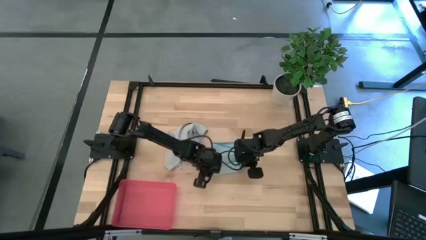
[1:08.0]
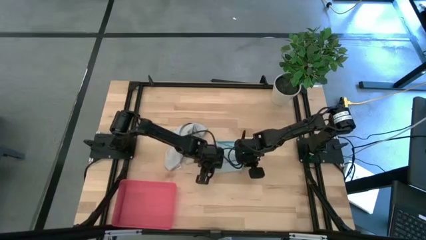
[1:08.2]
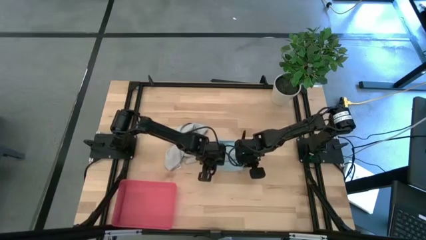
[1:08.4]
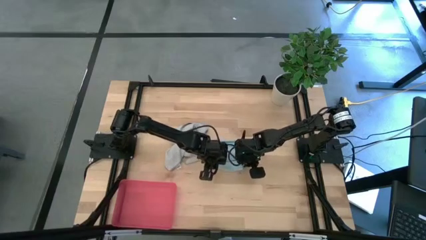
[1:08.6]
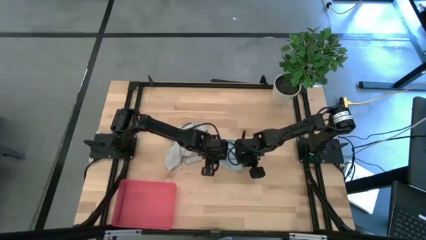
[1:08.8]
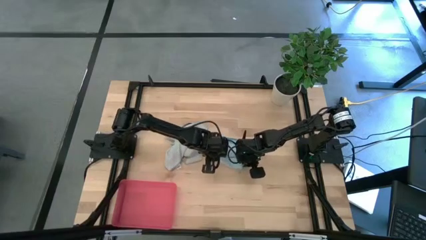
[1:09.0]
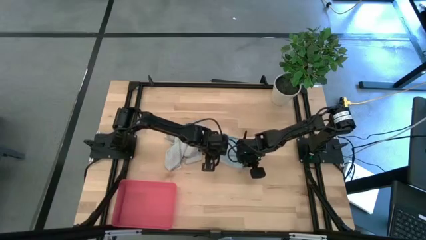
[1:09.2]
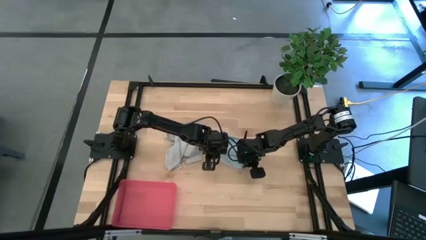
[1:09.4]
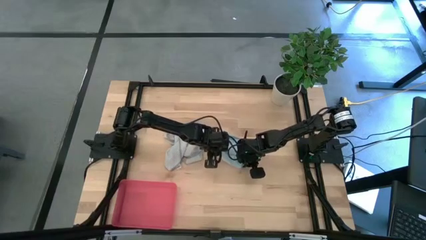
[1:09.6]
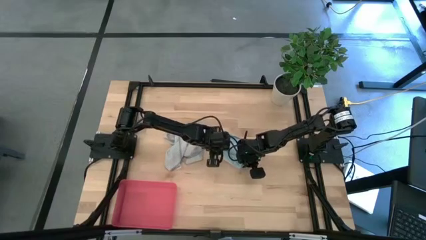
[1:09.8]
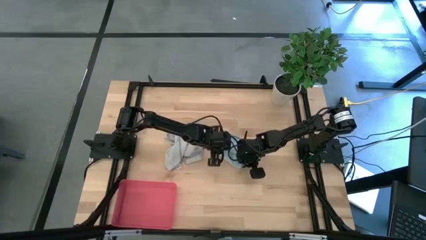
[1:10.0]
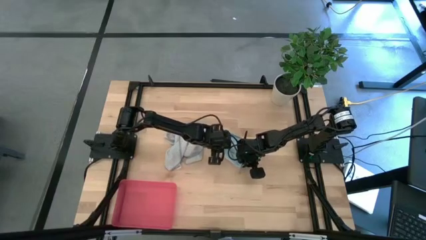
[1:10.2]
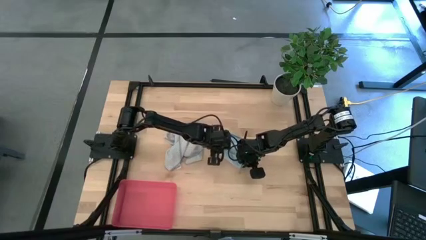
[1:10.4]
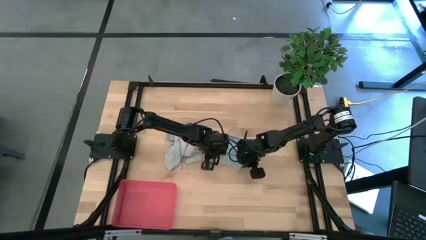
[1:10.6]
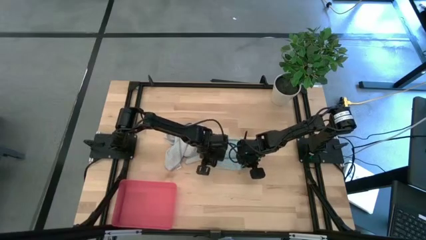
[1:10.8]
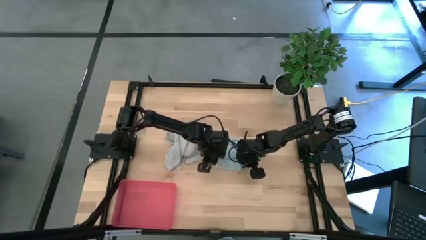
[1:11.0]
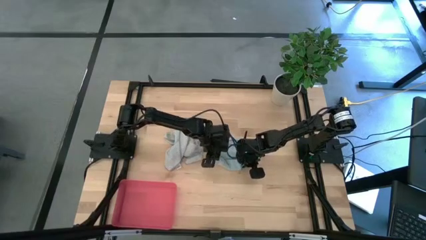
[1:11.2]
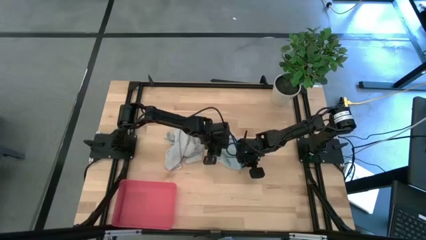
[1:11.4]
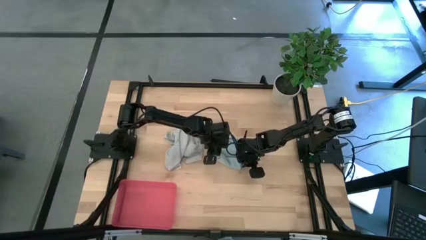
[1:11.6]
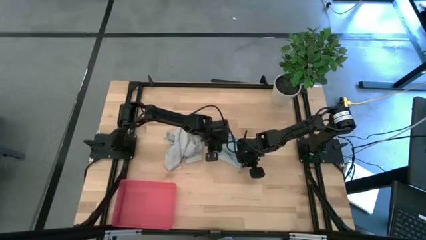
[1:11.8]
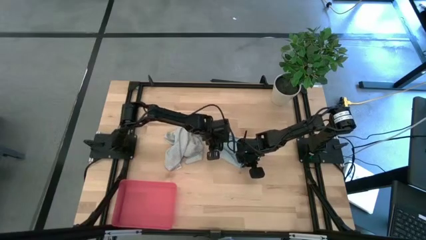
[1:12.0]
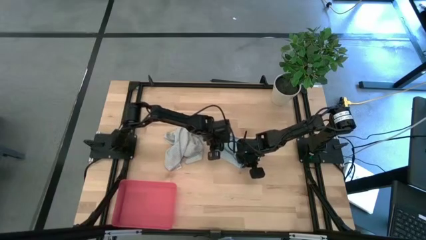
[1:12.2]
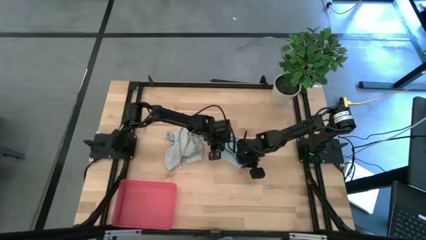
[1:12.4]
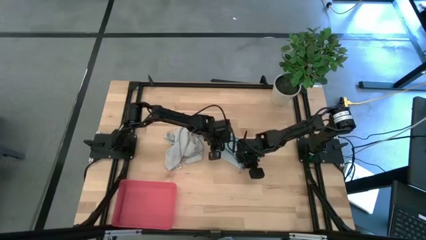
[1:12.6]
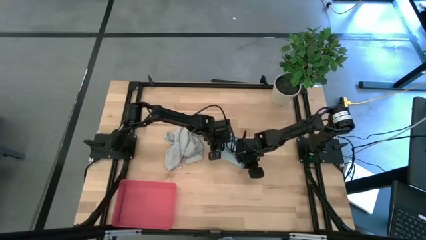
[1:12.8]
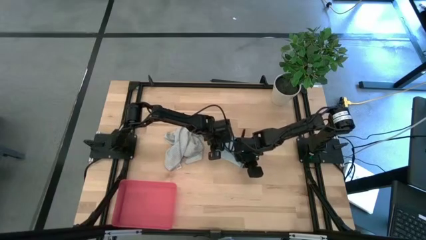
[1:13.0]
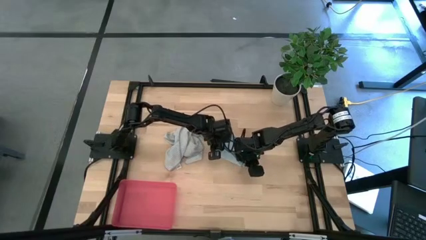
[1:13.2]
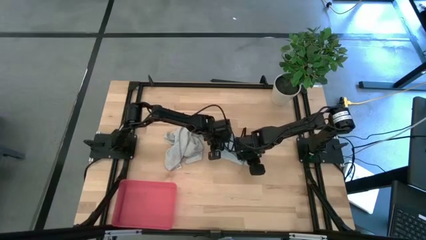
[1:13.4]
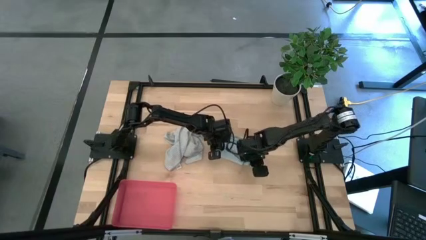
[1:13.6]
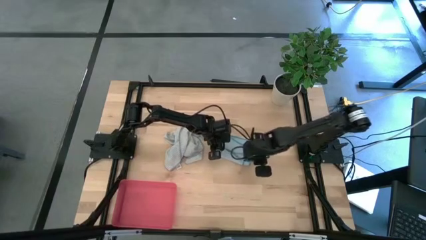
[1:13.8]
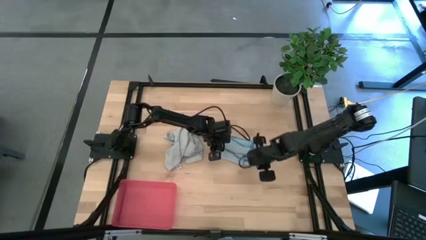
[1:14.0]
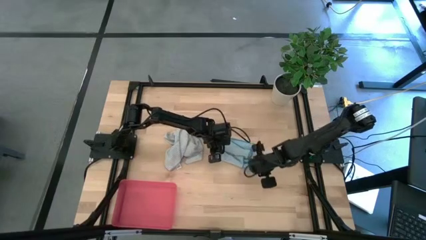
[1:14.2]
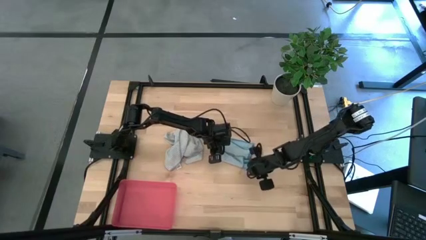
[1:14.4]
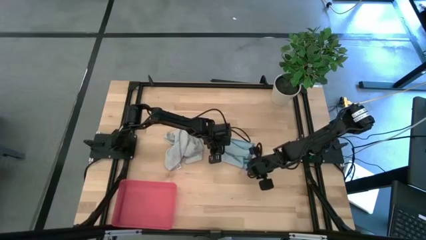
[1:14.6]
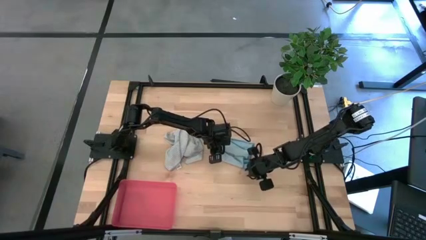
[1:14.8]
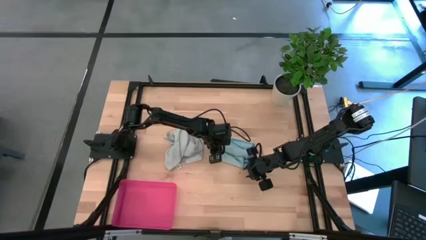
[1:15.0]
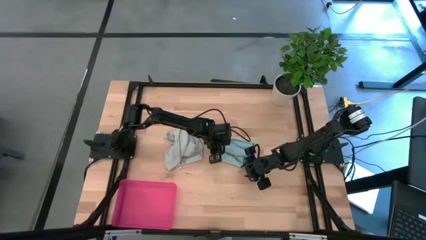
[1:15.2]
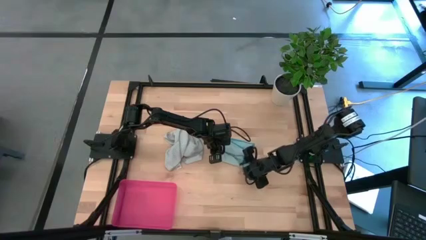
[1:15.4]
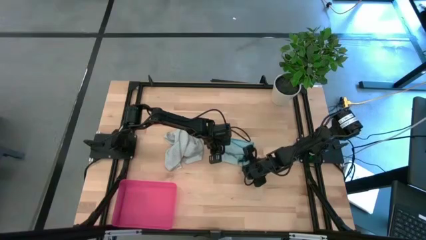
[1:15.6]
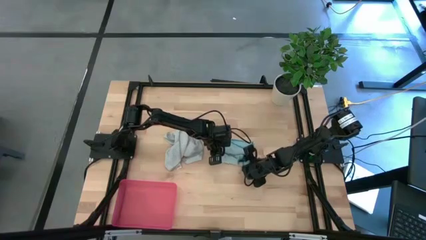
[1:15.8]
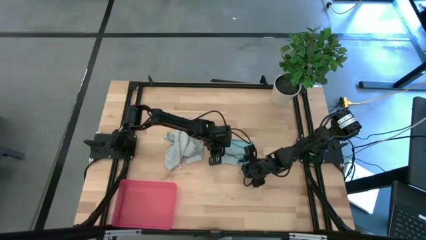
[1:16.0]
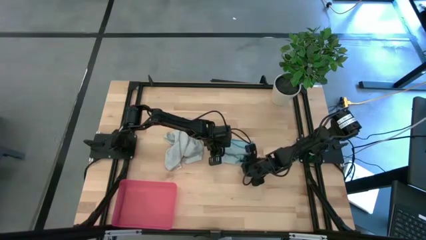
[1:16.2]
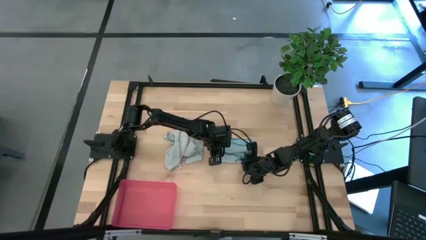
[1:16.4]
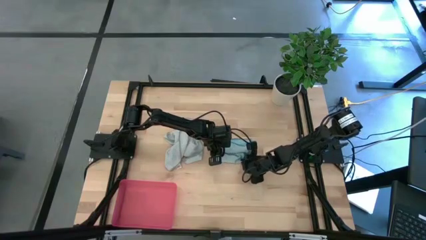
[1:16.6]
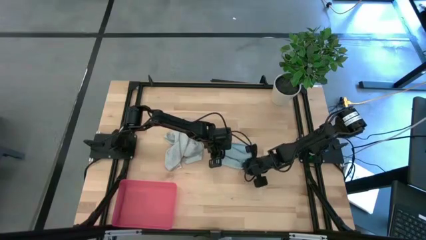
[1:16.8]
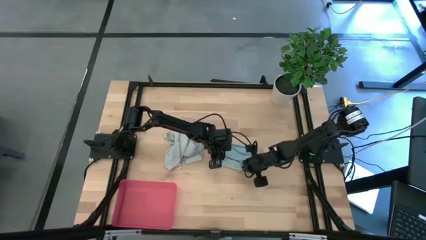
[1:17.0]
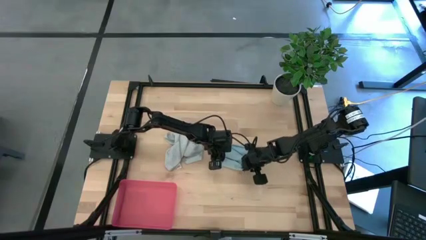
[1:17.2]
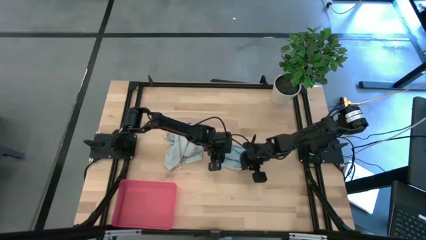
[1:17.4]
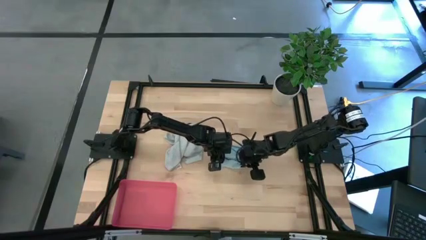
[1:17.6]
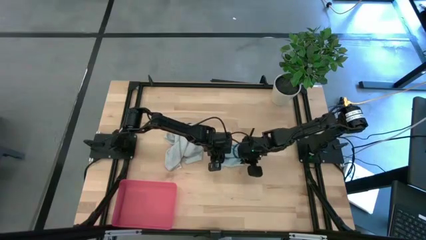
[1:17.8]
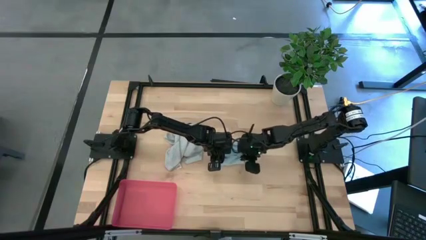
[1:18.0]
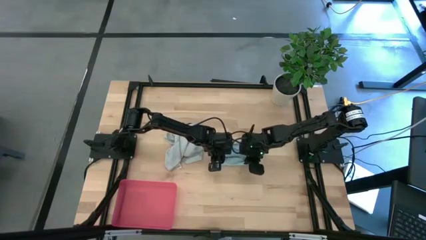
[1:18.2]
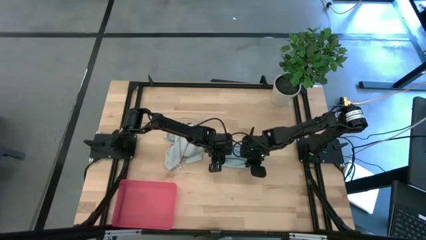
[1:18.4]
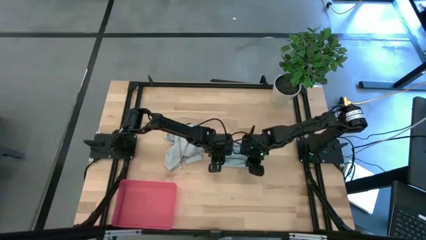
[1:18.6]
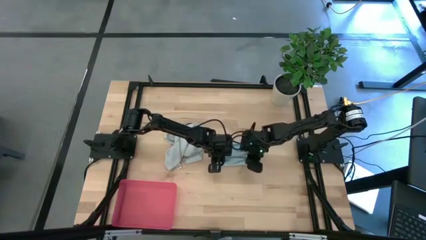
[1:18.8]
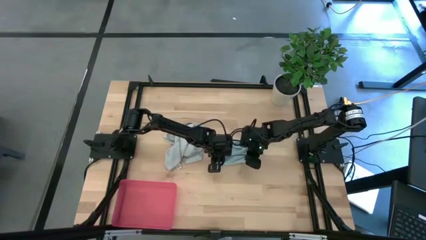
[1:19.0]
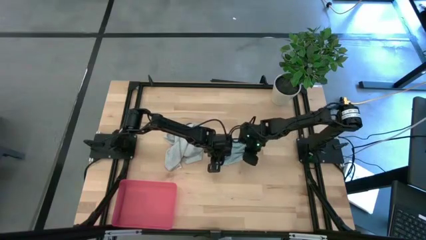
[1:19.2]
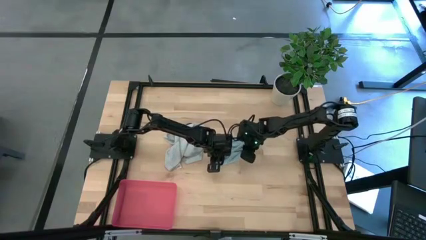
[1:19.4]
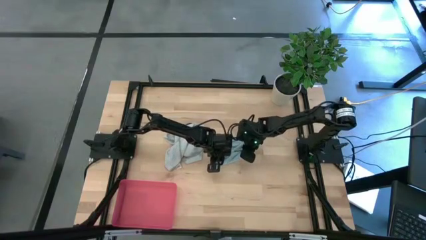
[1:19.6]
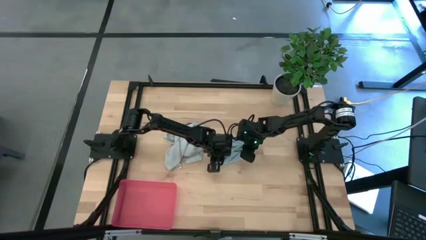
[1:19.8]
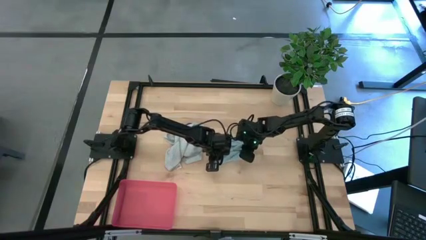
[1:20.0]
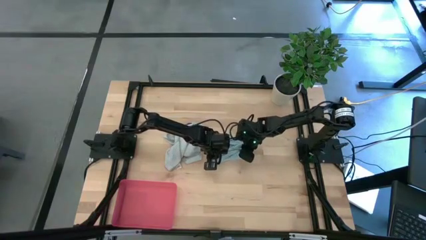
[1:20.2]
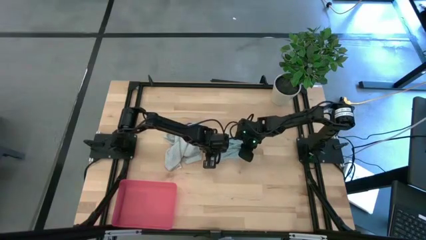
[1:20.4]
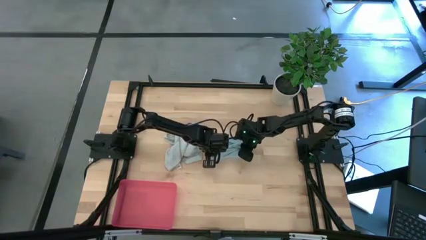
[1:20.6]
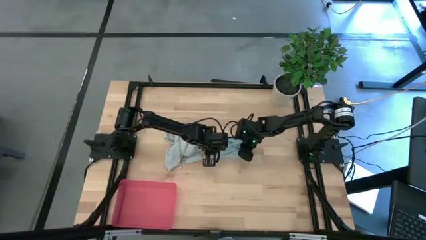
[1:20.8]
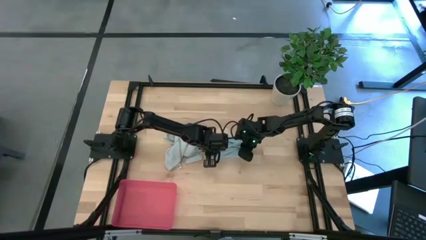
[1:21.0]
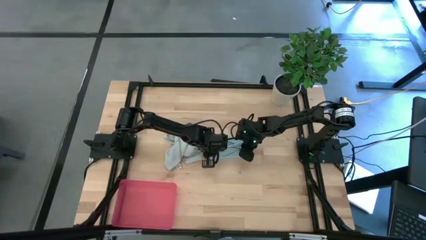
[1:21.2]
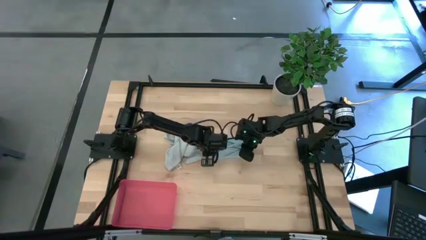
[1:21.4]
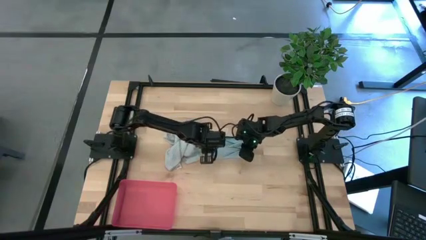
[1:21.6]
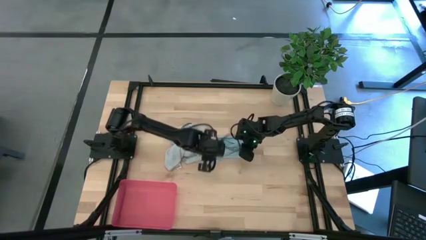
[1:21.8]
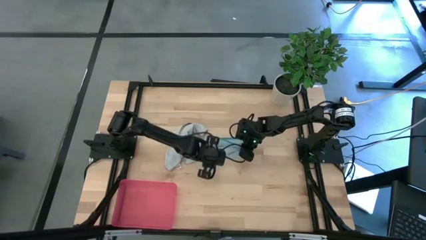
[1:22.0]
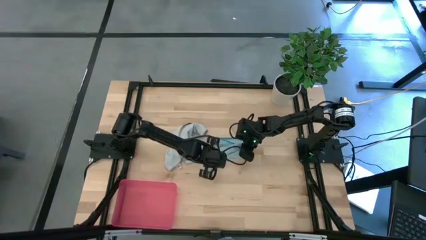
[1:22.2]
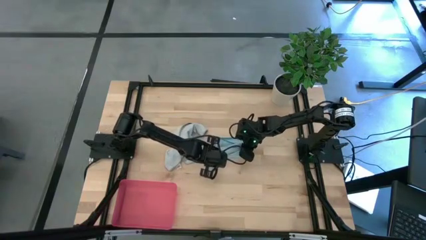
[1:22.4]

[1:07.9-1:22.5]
Task: Roll microfiber towels into tight, uniform cylinder then place into a basket
Roll the blue towel
